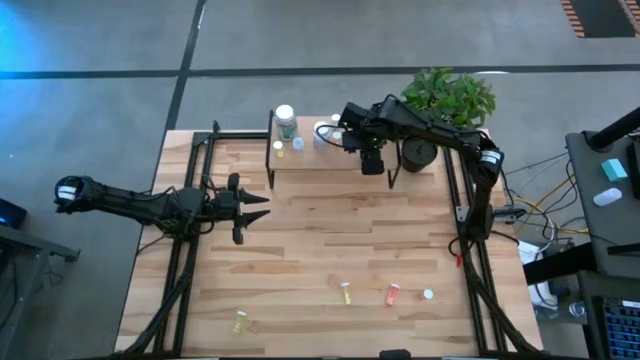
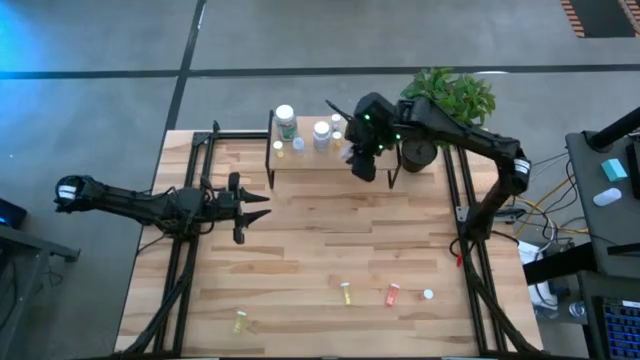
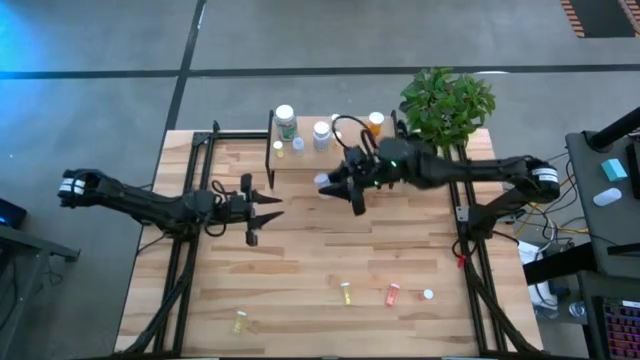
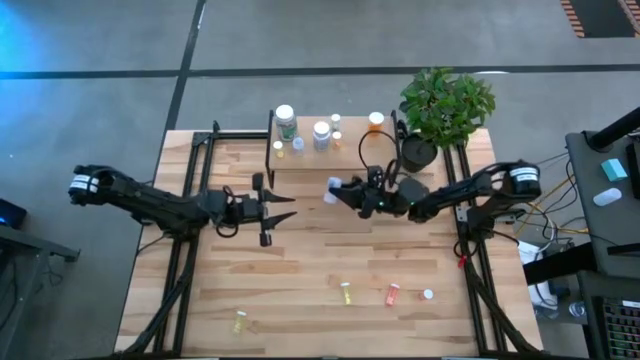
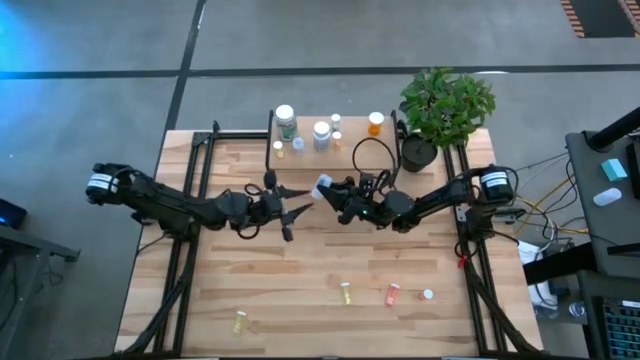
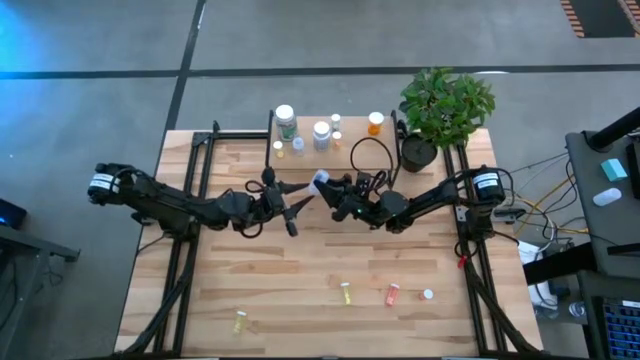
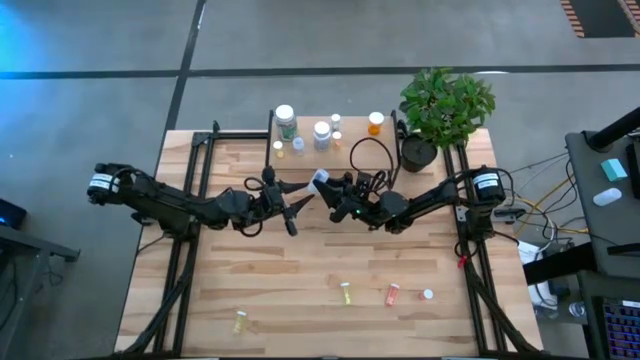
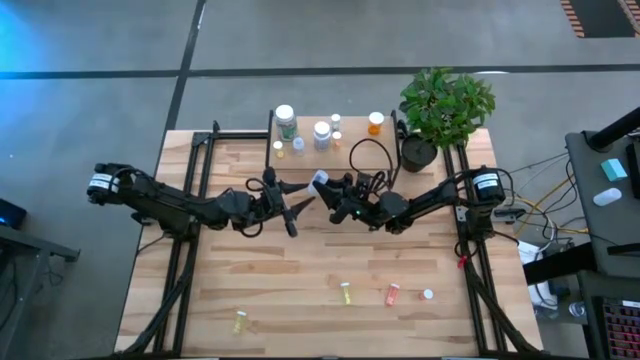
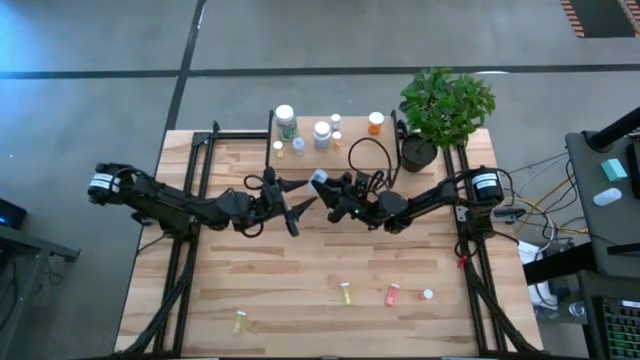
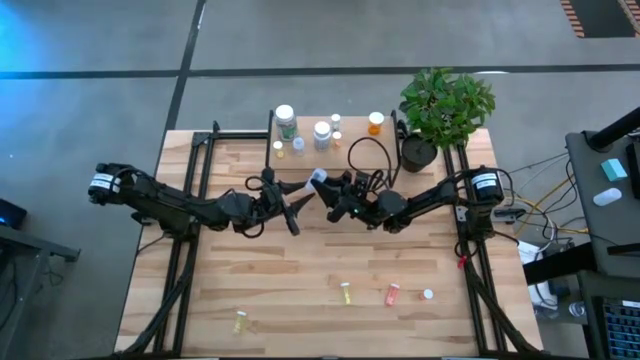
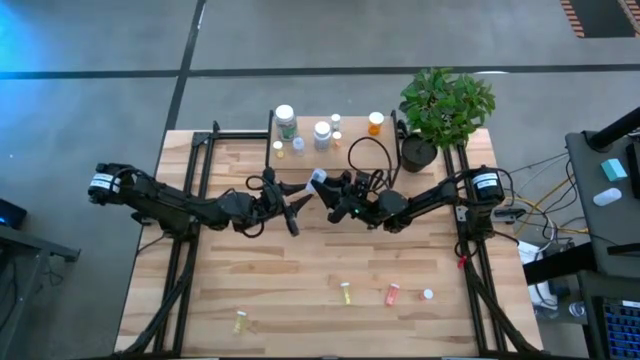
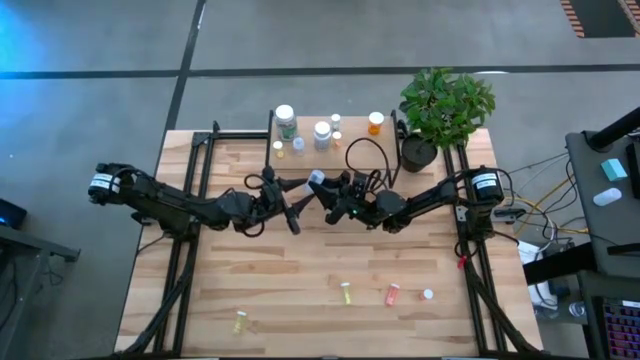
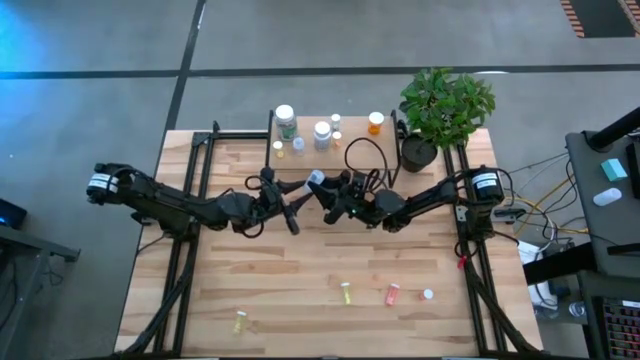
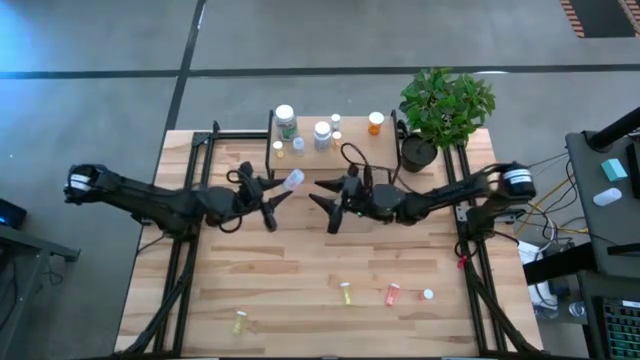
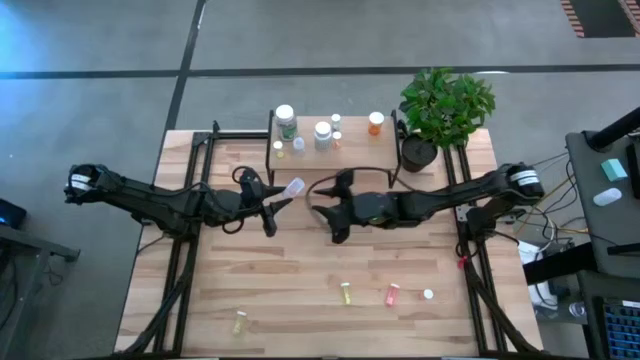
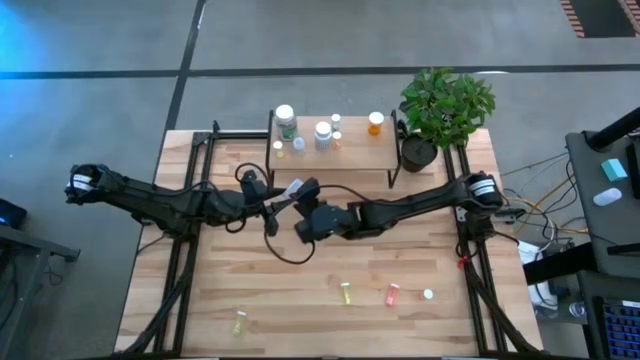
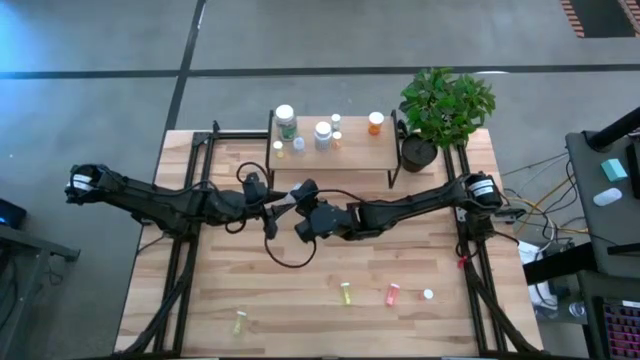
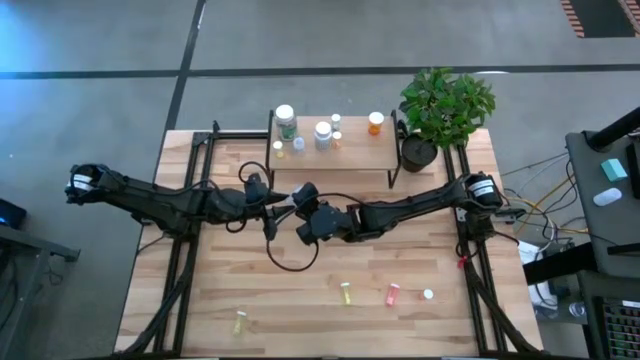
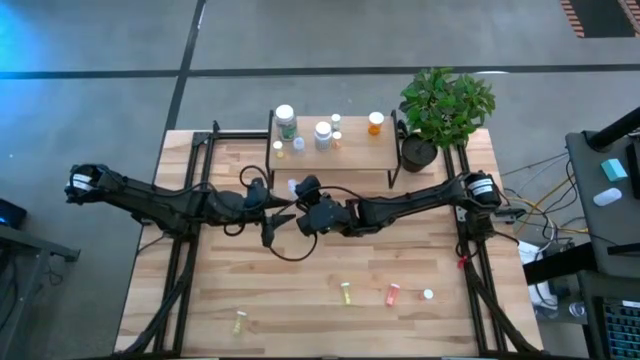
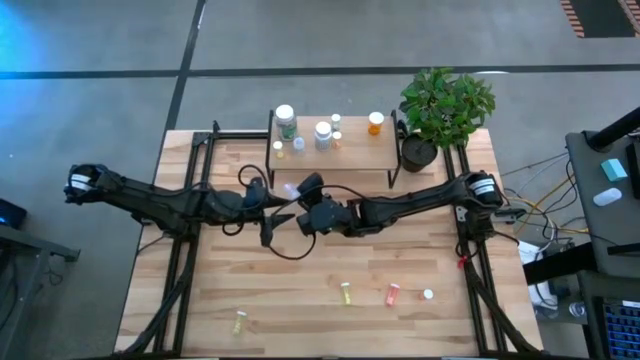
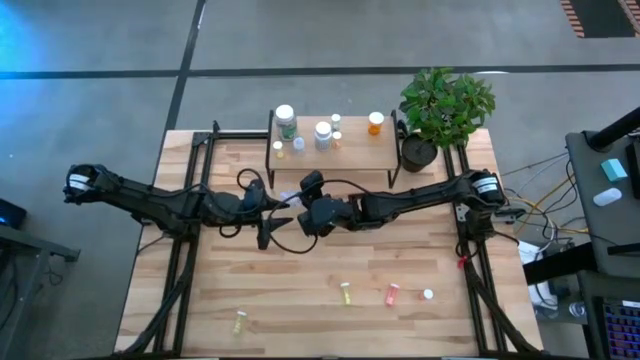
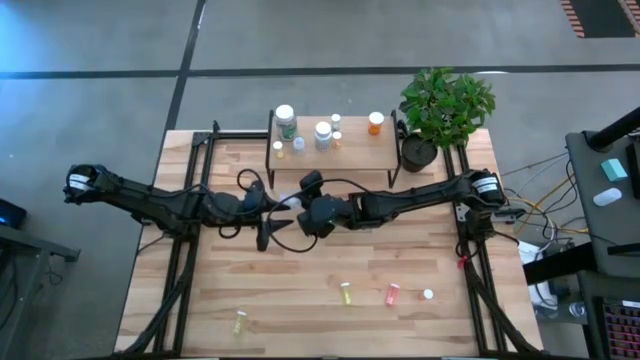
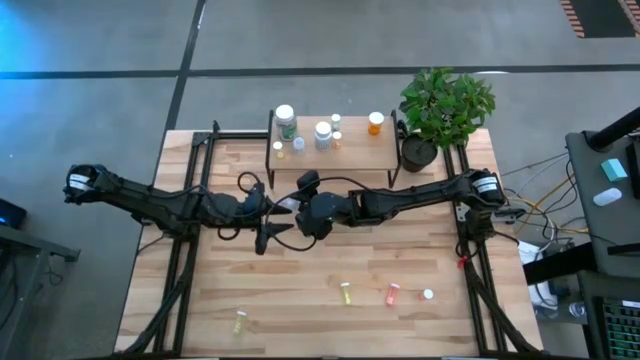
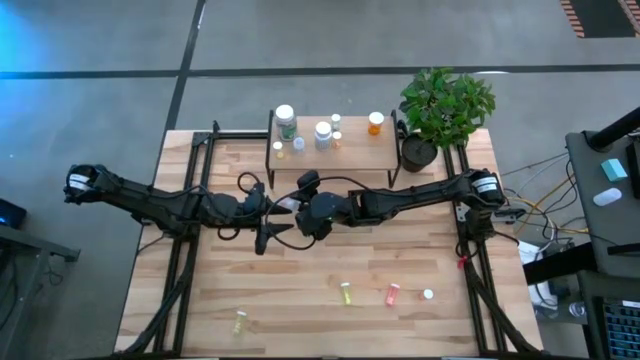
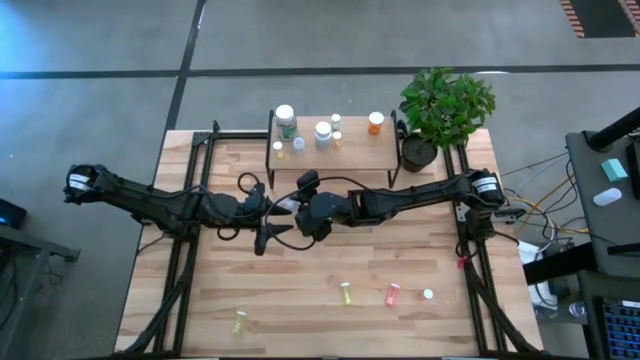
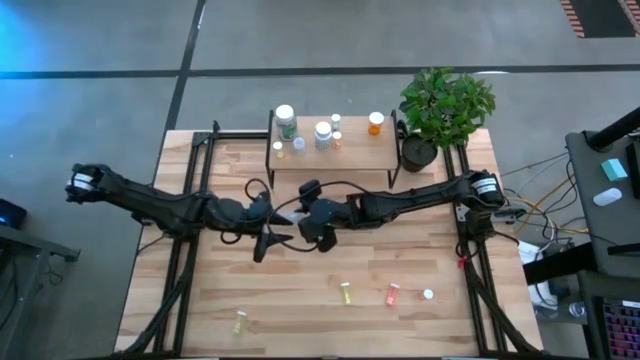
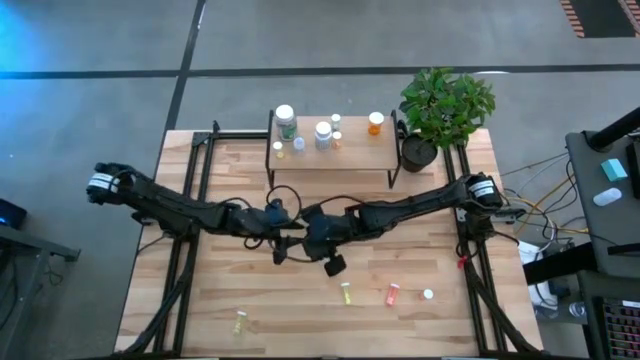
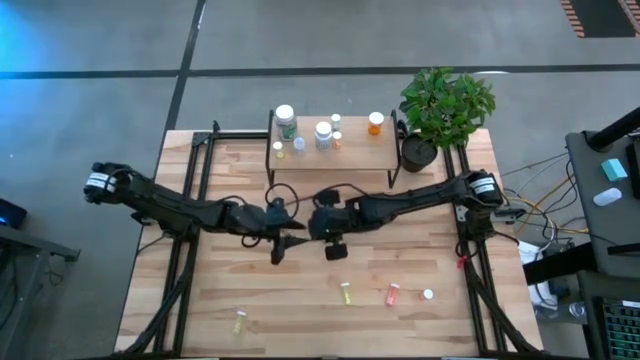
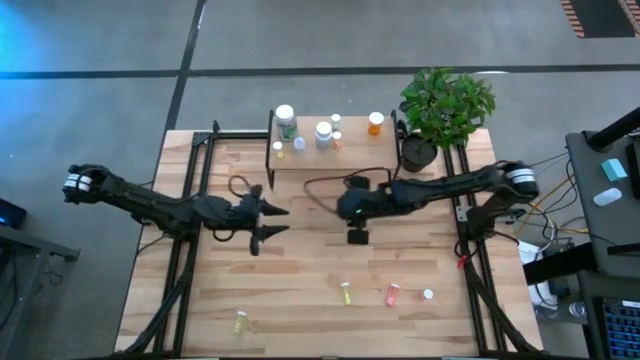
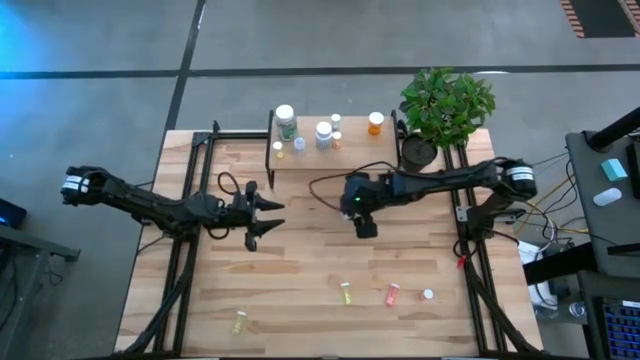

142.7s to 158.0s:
Task: Pick and place medicine bottles onto shelf by color
Put the transparent pill bottle on the shelf

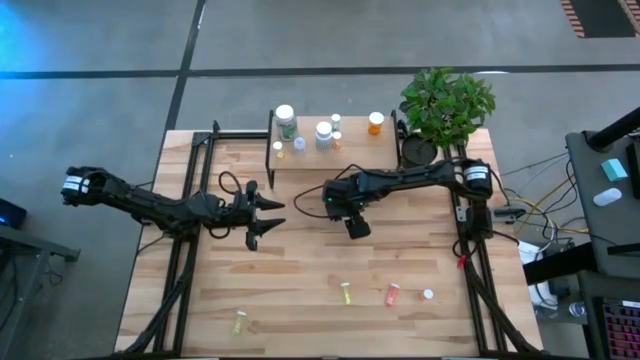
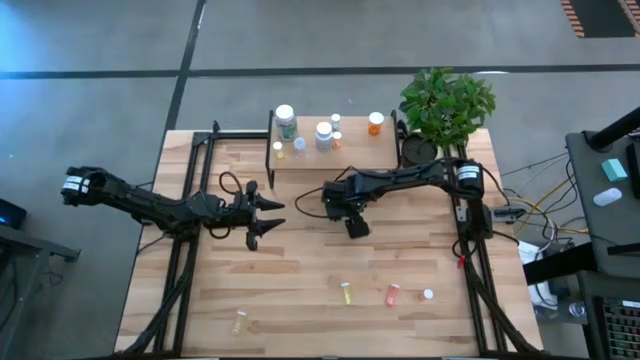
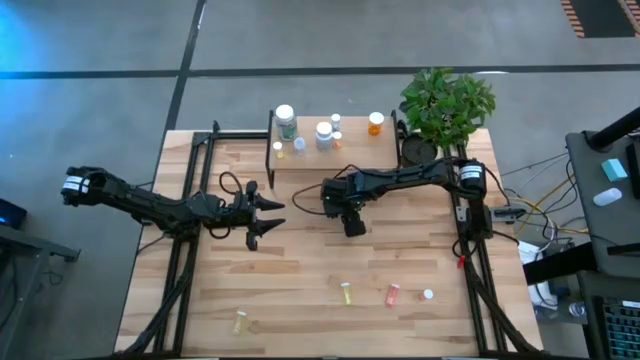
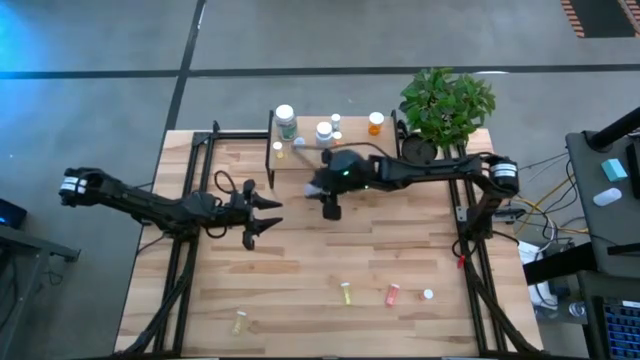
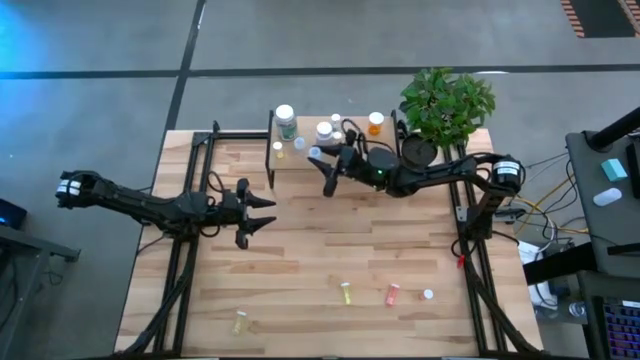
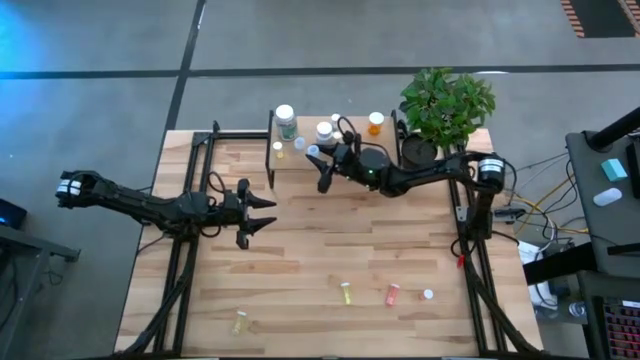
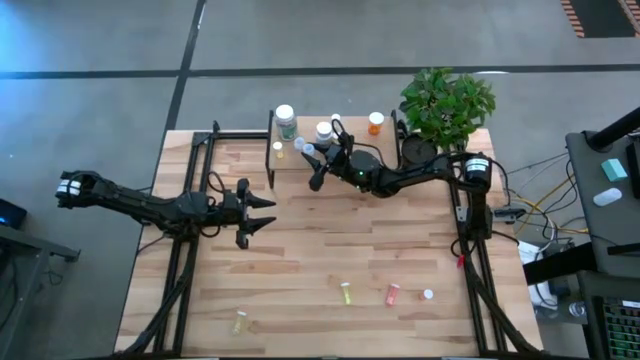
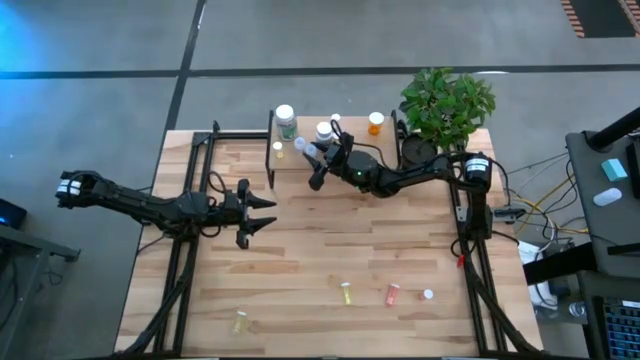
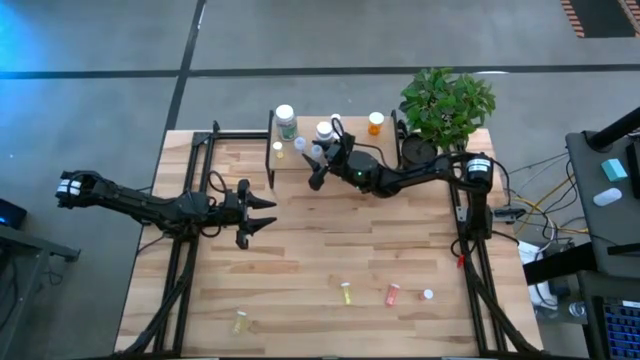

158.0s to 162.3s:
Put the transparent pill bottle on the shelf

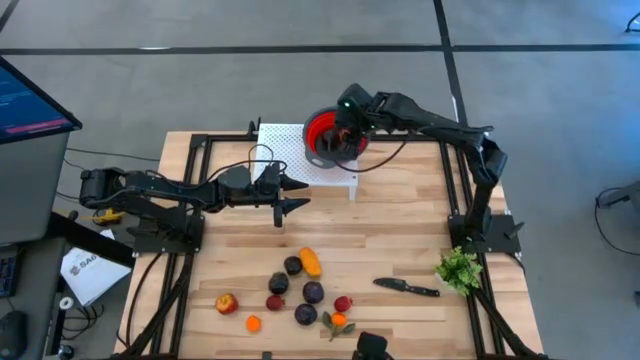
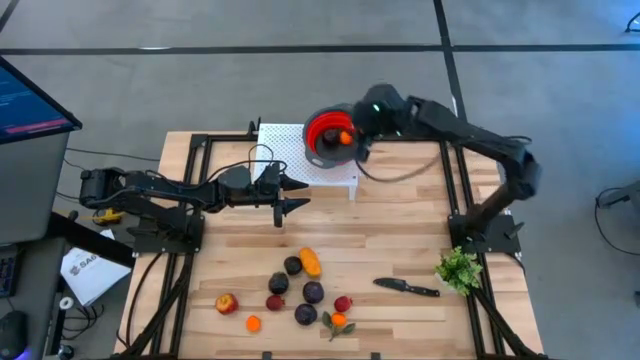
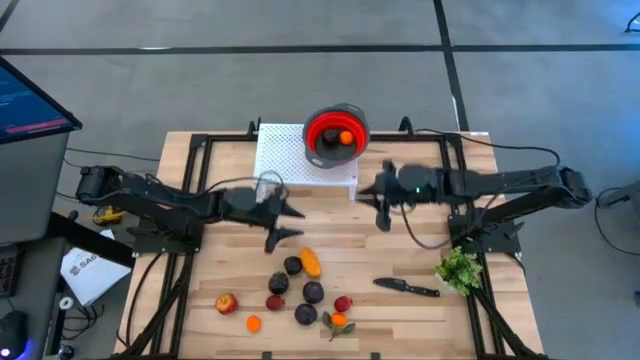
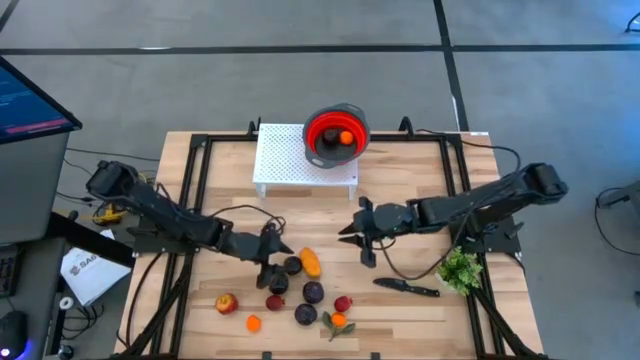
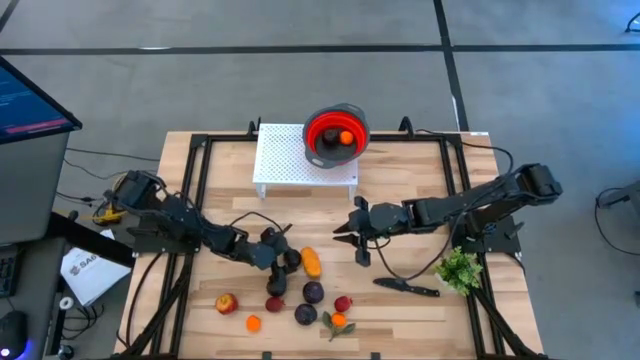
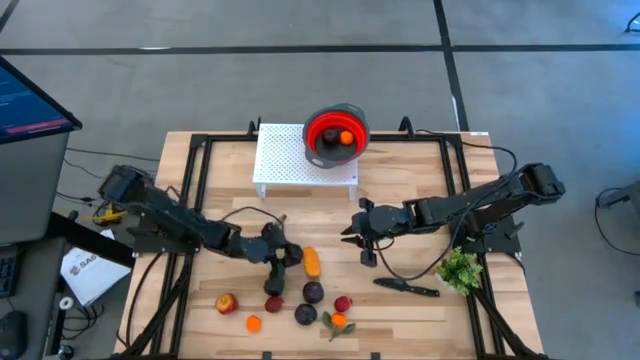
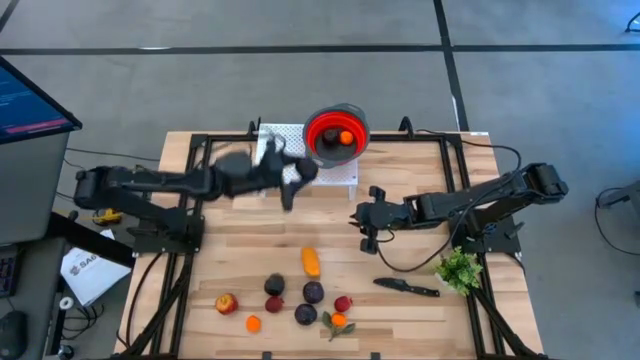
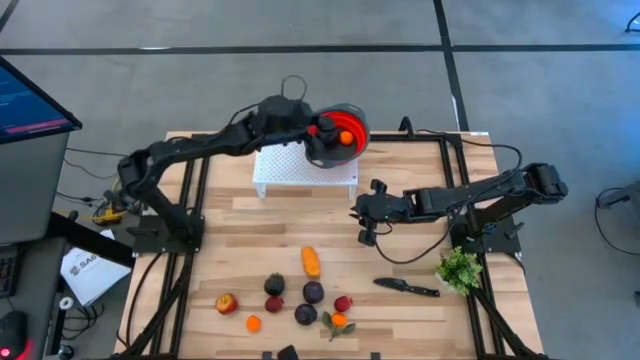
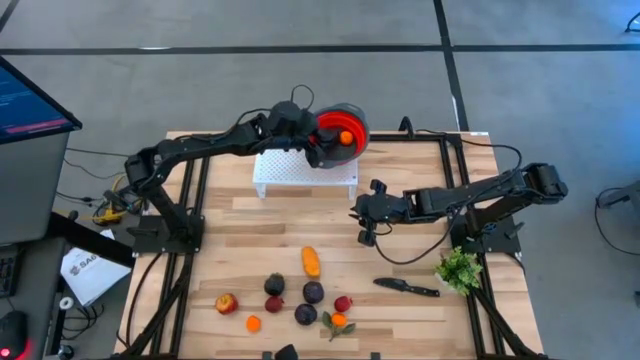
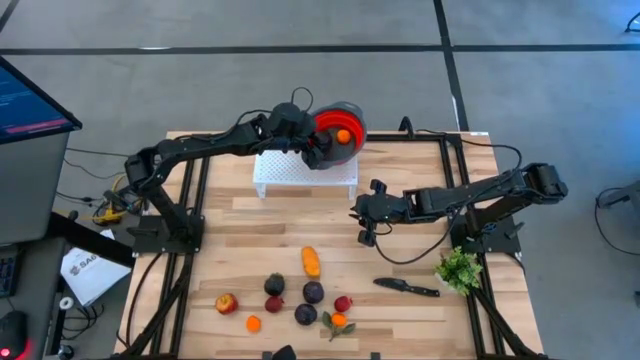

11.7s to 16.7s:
Task: Pick & Place Fruit
Put the plum into the red strainer on the shelf
